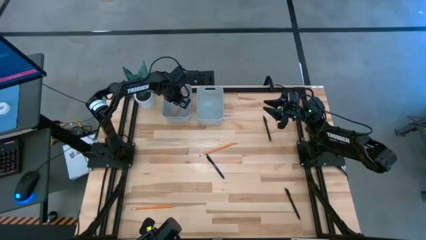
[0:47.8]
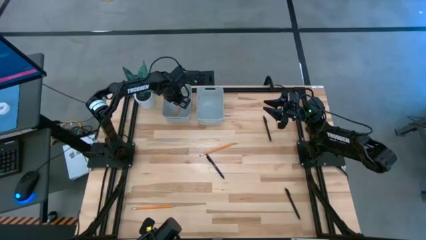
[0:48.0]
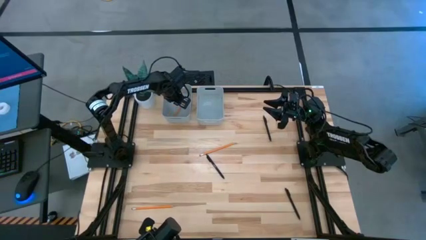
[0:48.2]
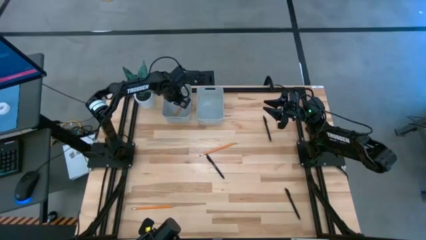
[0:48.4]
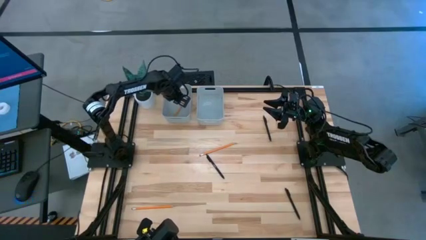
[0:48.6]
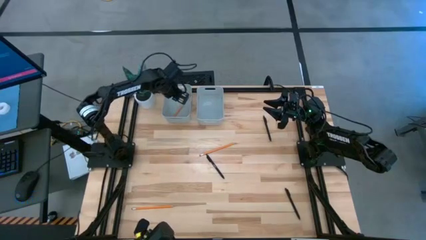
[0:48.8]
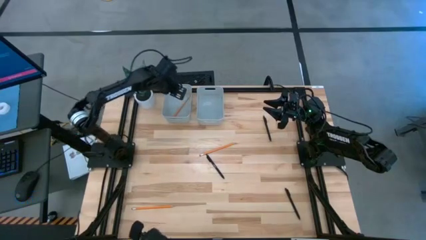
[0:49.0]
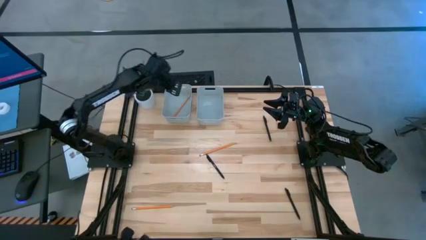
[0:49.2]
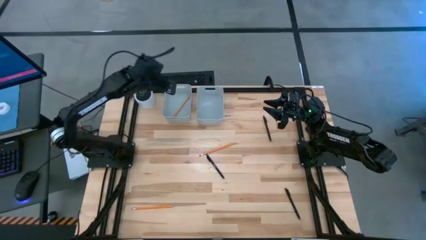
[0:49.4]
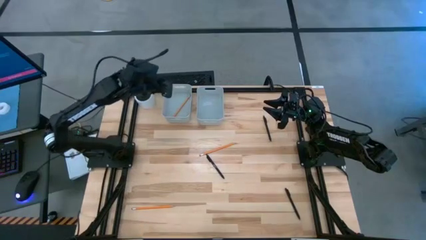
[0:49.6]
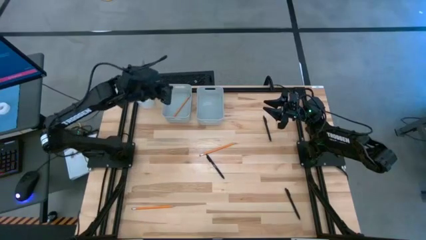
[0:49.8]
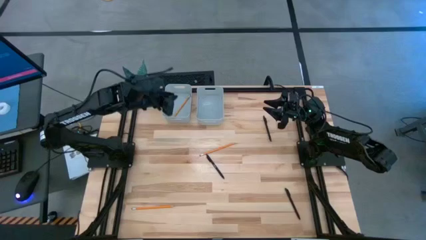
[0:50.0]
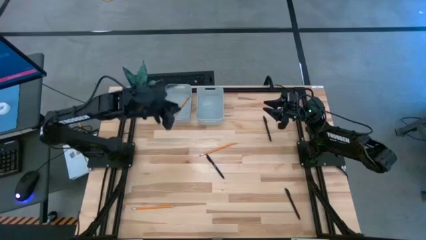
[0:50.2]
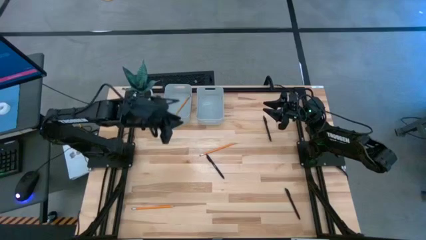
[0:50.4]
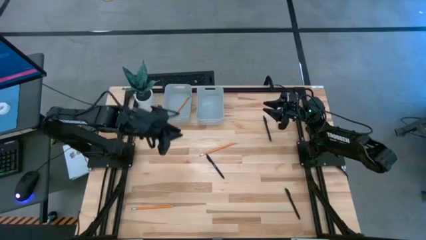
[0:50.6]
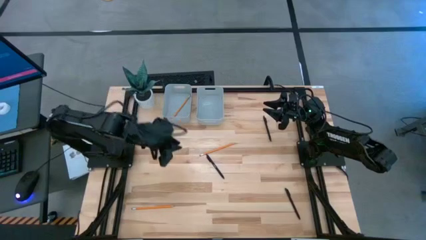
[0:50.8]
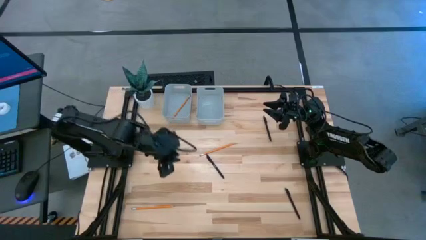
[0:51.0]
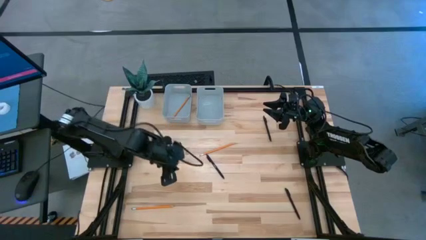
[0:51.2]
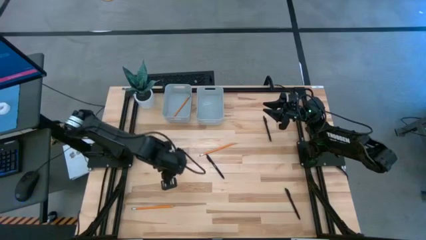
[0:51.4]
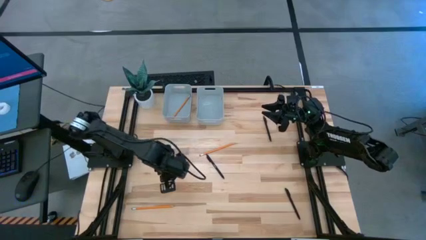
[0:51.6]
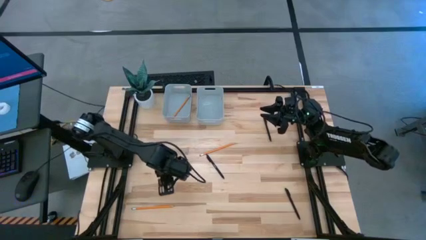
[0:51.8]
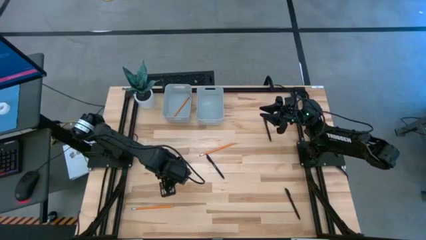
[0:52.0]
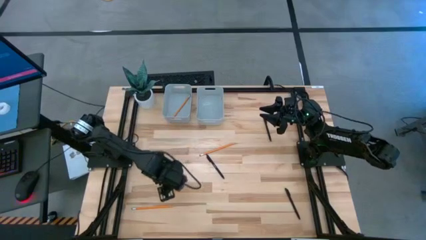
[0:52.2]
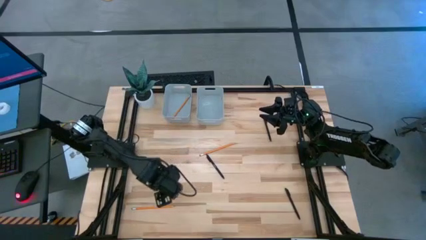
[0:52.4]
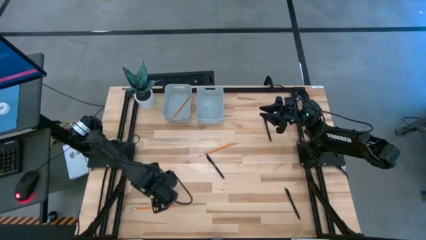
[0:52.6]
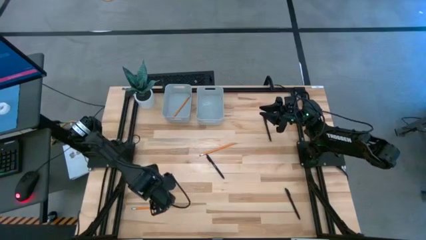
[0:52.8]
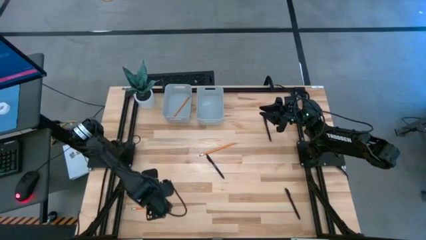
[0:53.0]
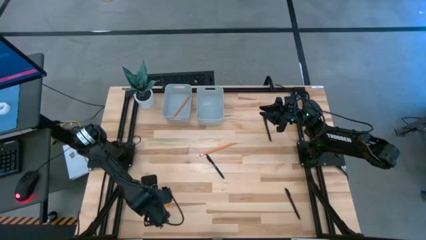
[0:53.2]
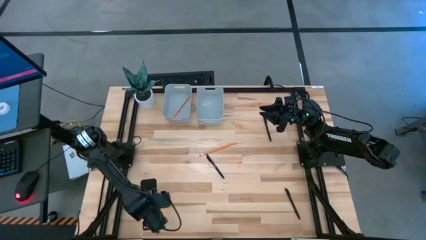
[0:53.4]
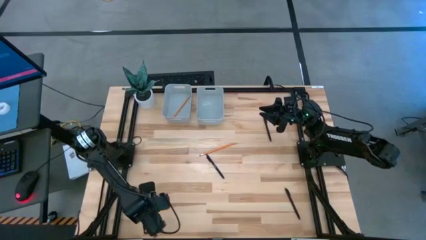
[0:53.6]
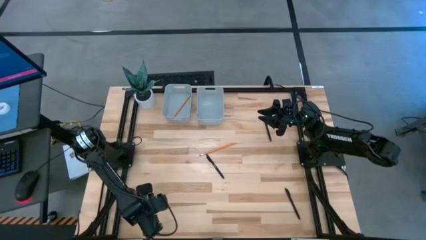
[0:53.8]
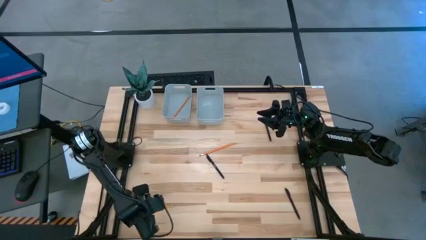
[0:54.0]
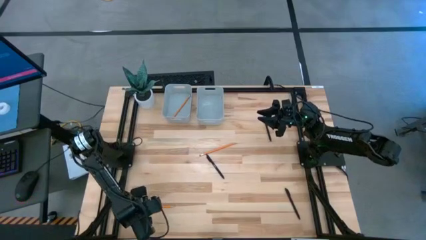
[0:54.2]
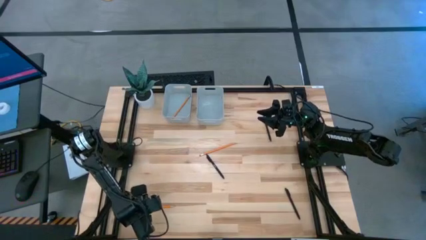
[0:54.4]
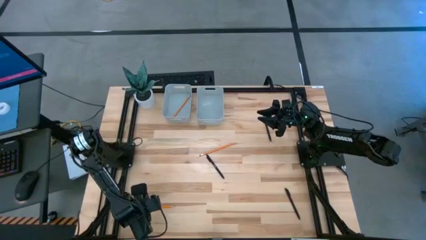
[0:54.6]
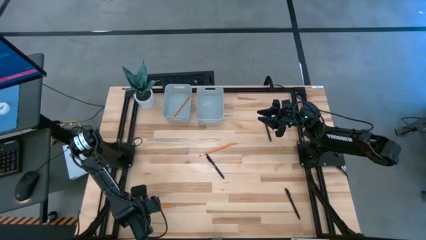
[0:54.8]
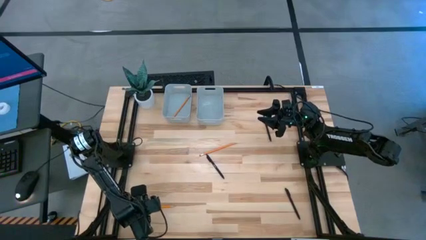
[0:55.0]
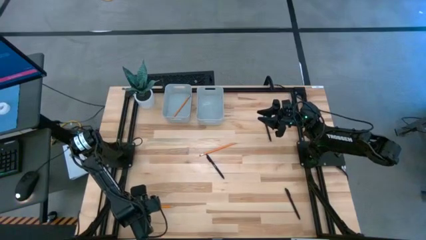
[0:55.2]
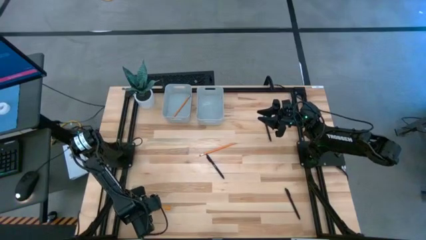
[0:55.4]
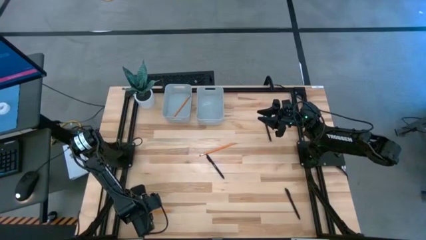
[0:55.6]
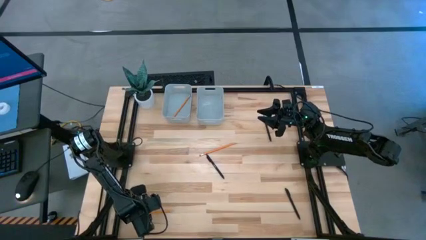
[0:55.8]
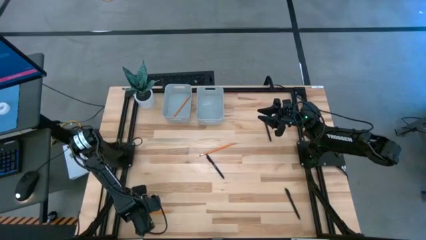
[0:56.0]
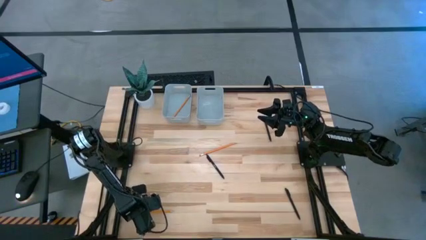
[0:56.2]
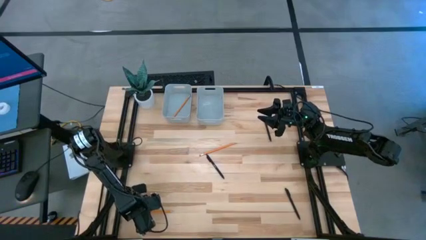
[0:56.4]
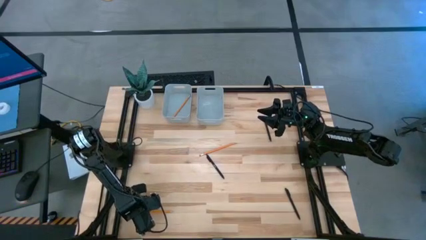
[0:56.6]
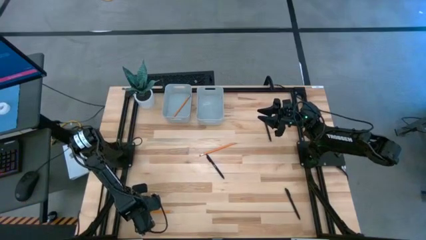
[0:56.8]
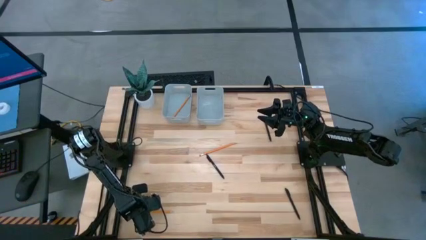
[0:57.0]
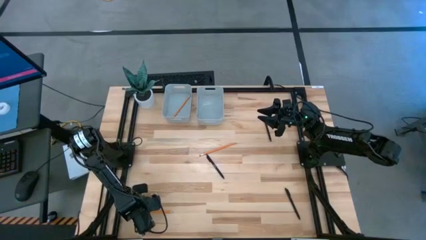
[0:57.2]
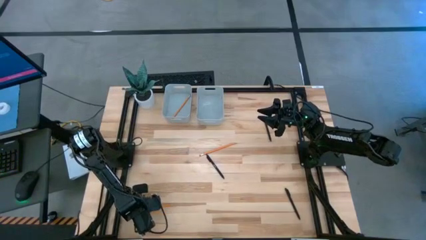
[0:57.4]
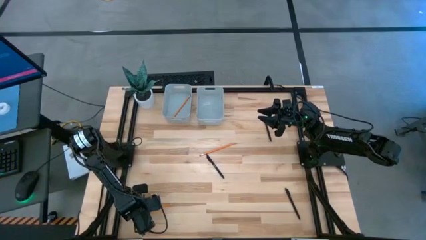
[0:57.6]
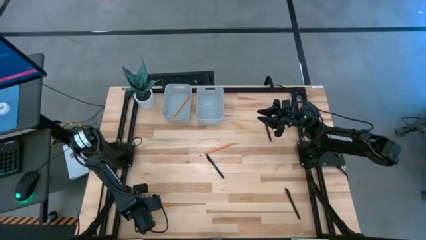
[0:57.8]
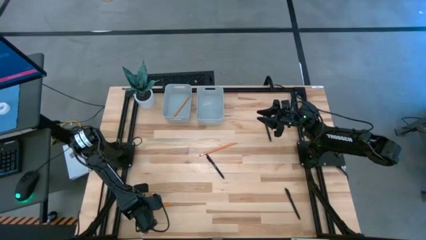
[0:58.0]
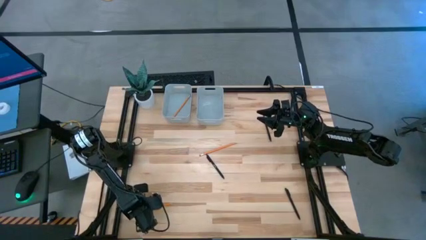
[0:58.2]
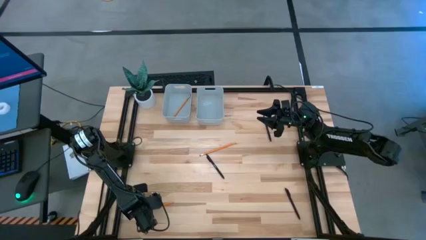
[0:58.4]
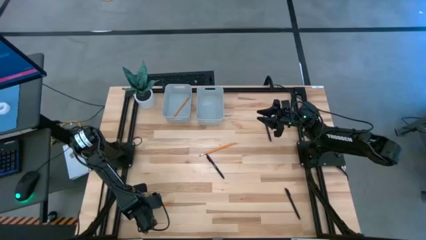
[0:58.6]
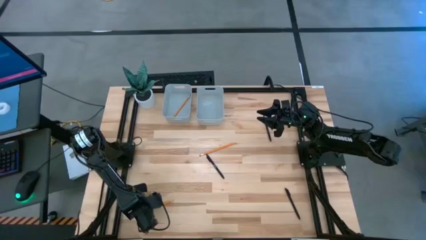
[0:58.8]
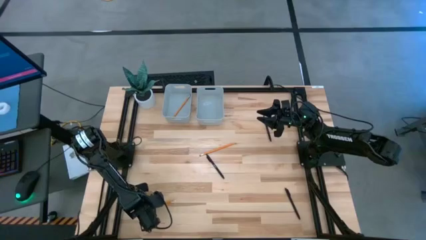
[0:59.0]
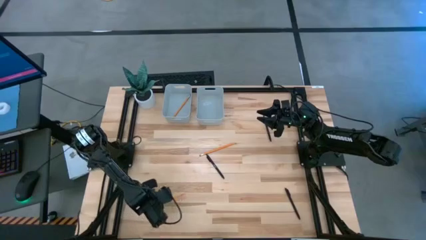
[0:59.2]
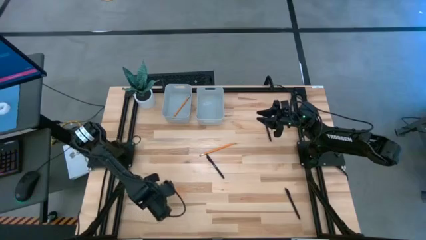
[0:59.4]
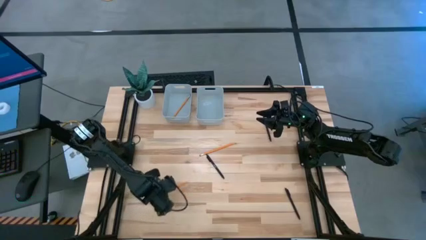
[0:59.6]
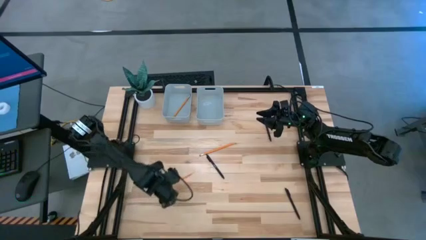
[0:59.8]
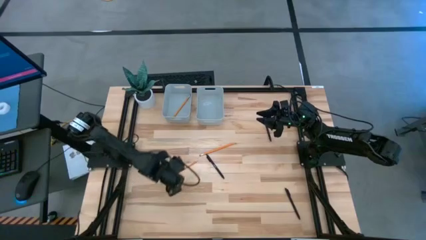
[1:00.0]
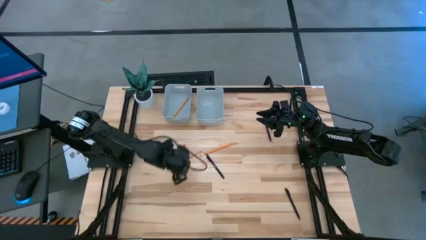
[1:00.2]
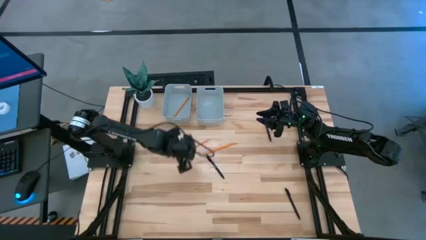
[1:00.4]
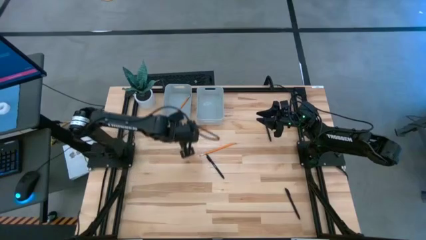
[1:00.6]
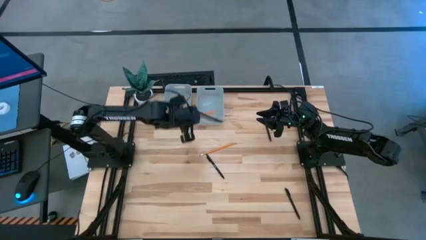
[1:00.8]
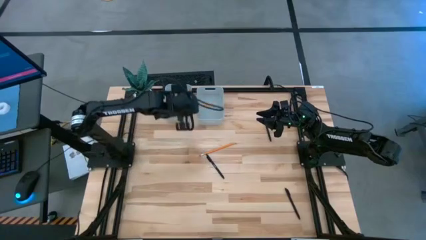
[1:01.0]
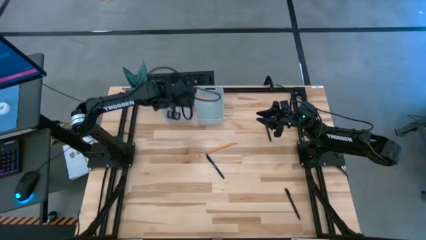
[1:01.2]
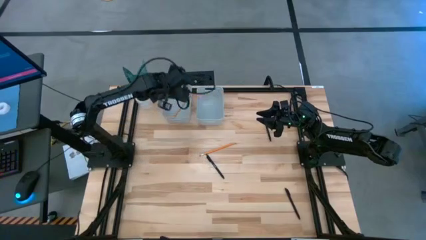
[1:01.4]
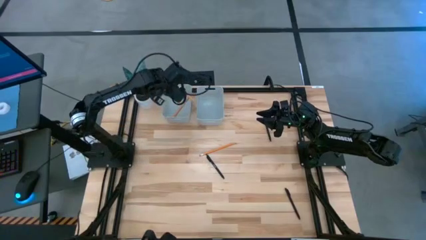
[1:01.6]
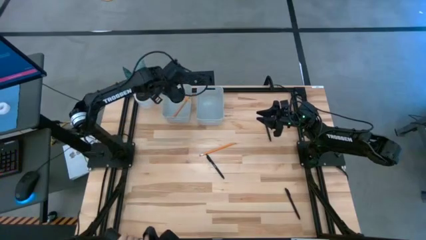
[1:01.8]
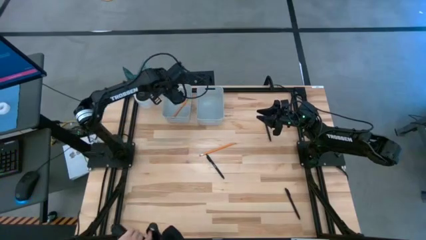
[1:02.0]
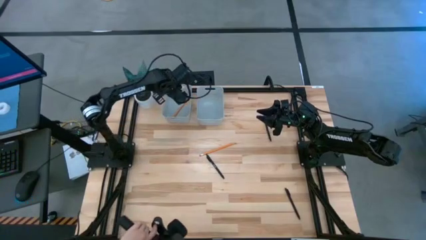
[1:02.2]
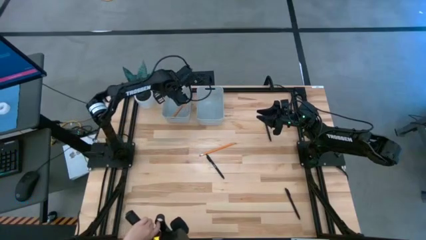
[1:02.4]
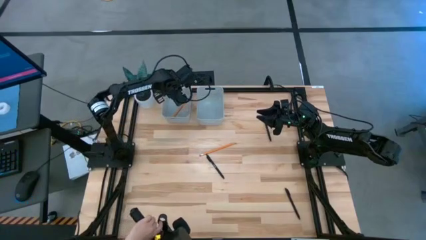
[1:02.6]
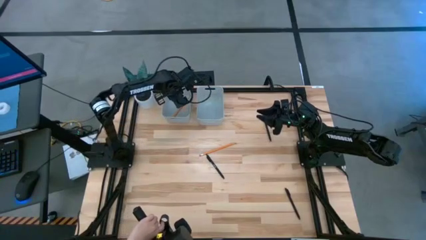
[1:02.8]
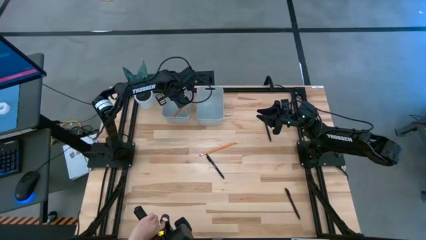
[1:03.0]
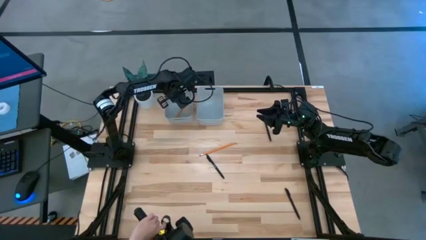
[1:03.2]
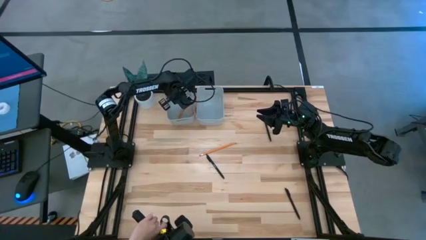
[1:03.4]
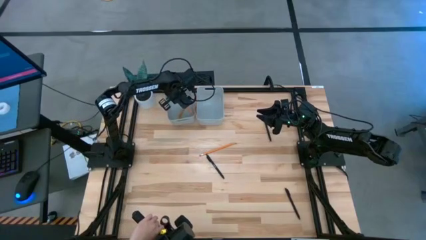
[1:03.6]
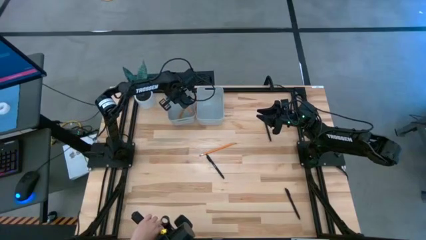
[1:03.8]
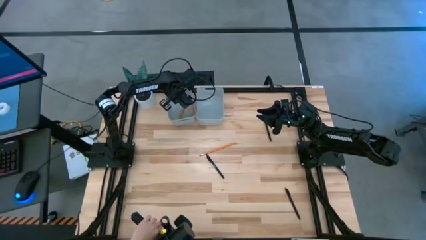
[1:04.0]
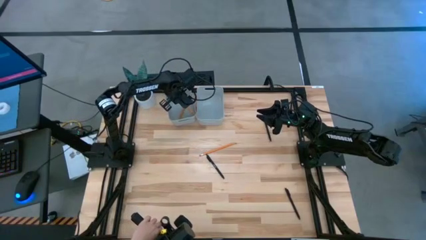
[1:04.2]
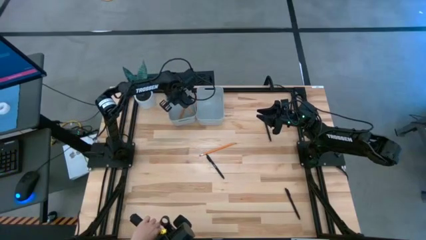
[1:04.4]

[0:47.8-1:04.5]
Task: Sort pens & pencils
Put the bottom pencil into the left bin
